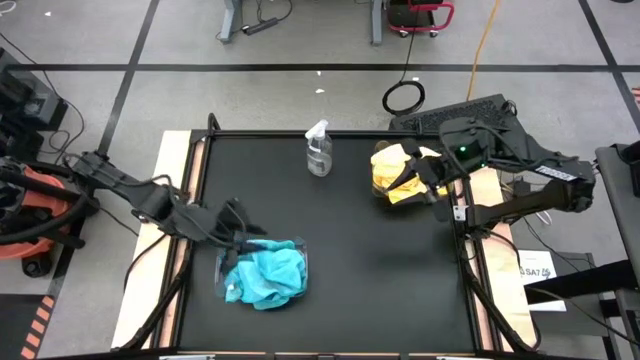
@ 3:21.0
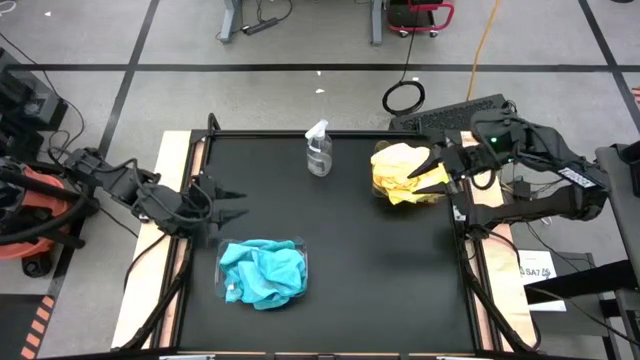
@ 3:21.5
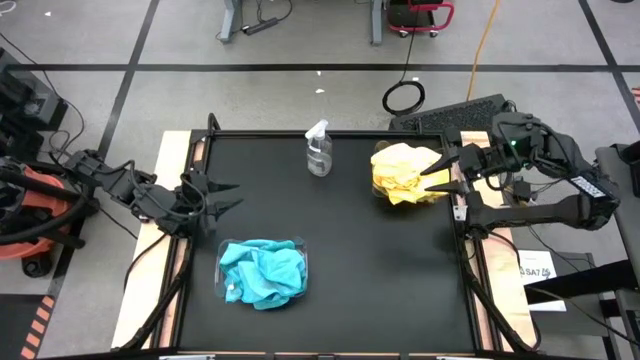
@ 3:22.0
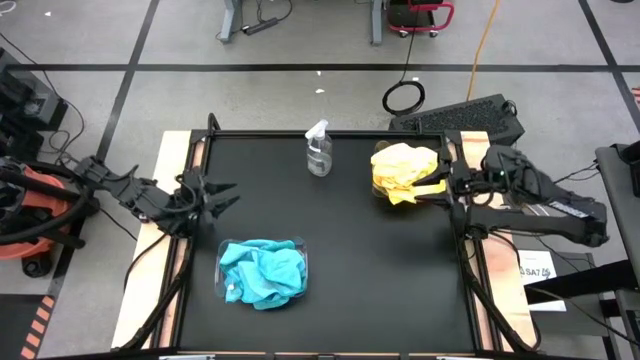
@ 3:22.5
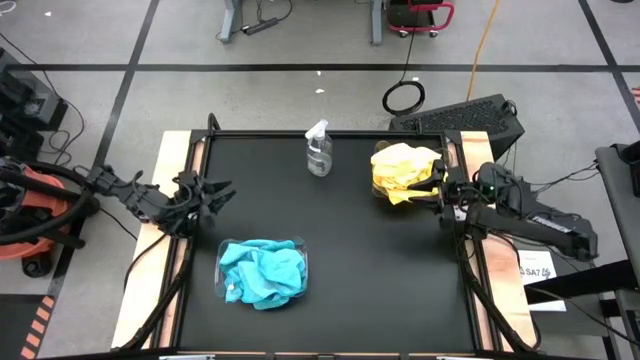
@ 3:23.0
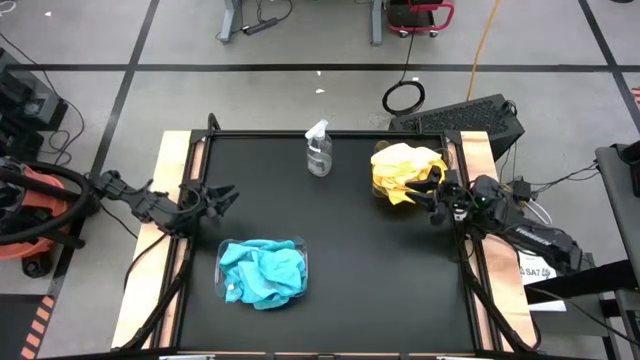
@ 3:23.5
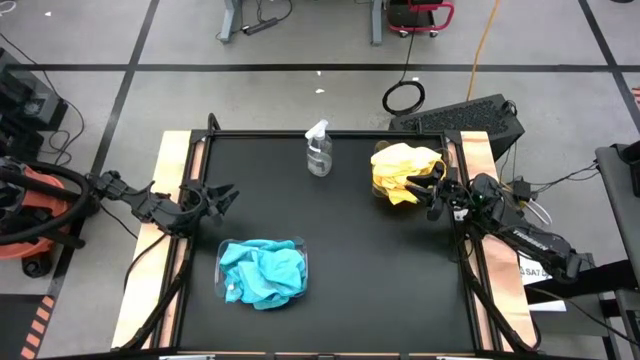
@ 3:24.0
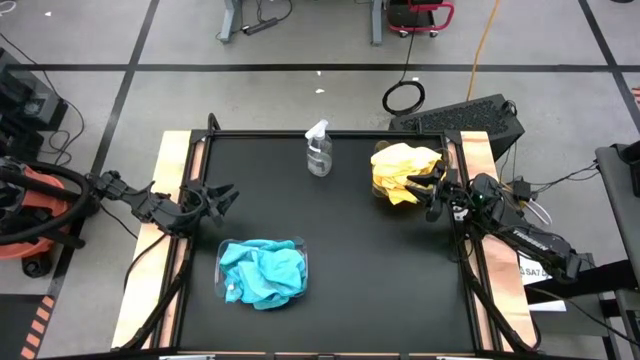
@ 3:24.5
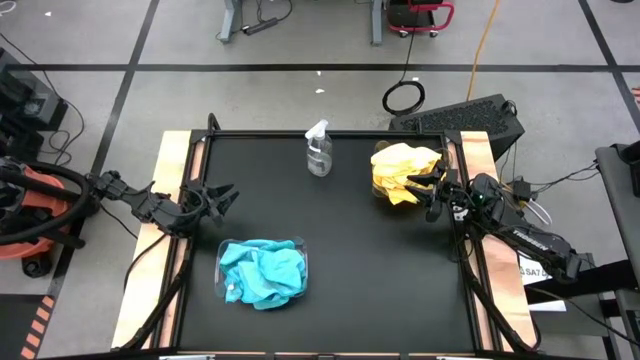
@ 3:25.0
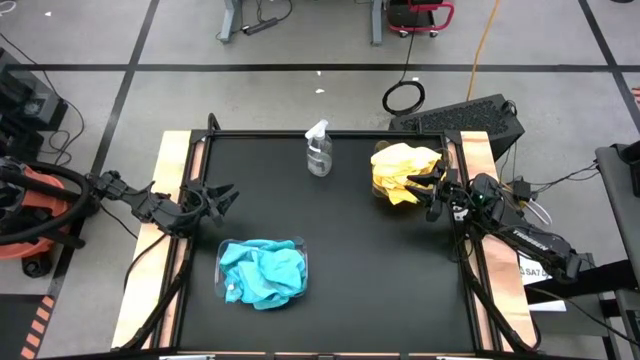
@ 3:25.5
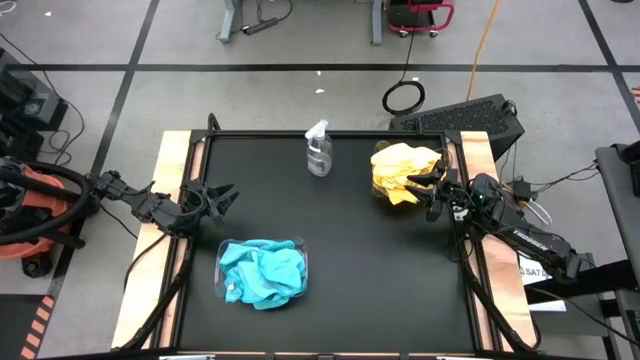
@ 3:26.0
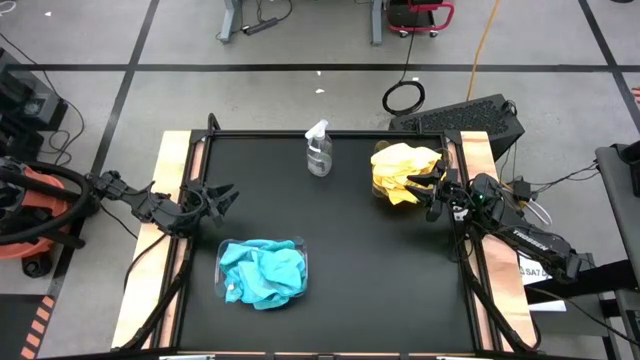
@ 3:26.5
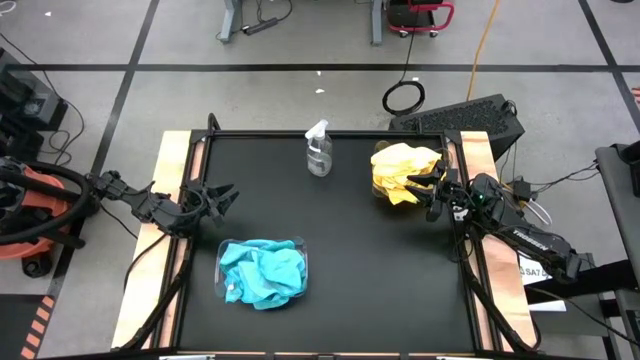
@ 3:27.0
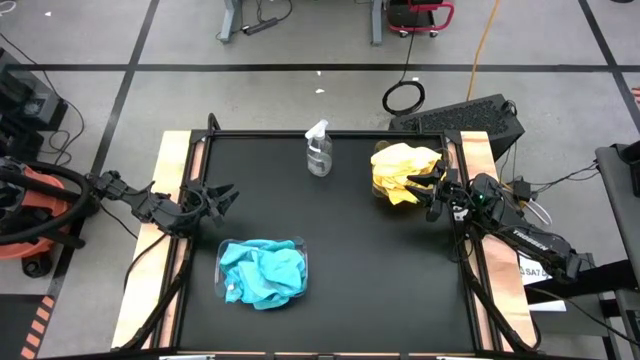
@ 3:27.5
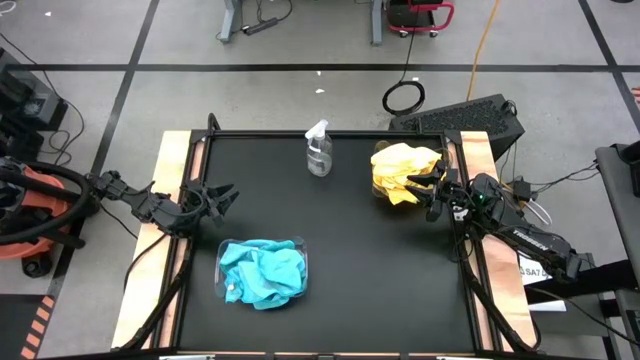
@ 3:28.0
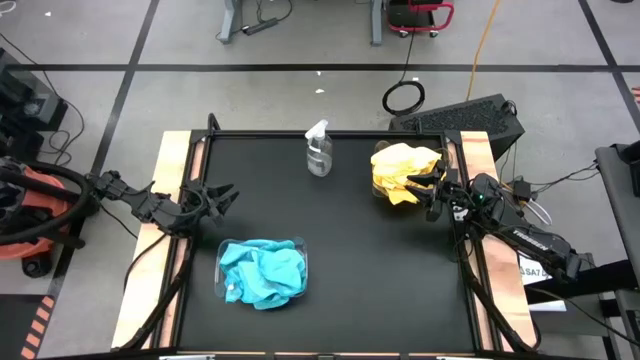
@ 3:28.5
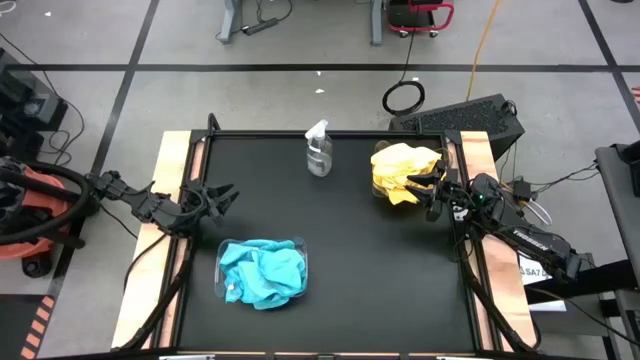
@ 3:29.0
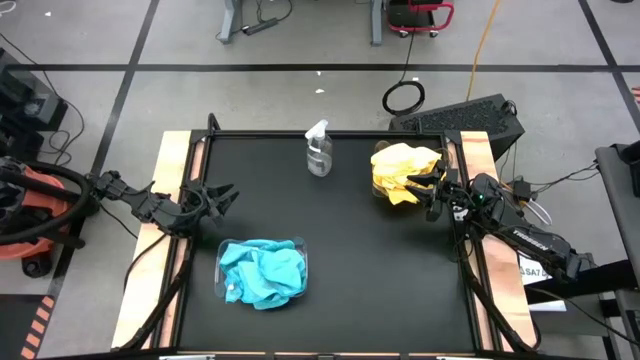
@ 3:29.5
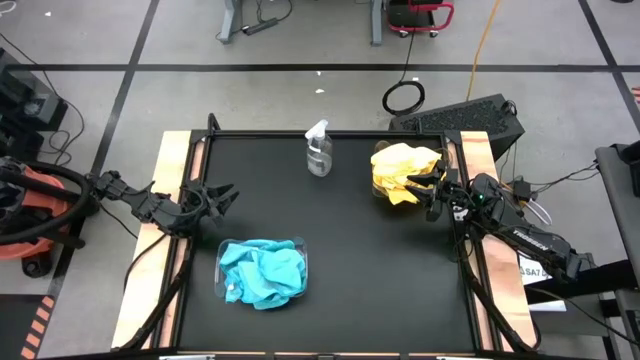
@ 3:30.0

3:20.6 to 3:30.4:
Task: Sort microfiber towel by color & place in baskets
Return to Home Position

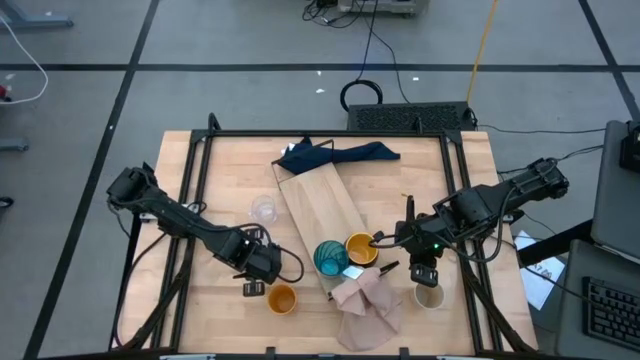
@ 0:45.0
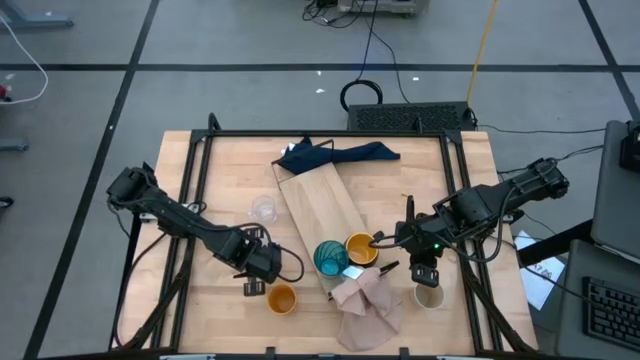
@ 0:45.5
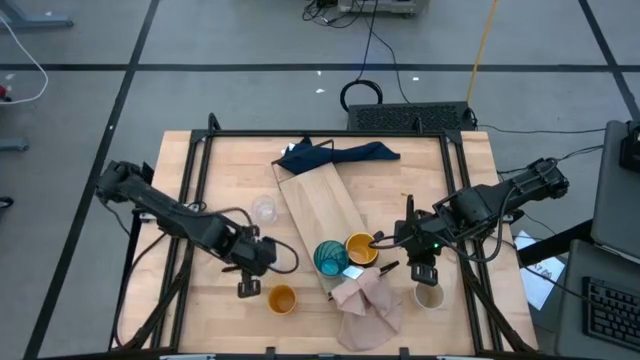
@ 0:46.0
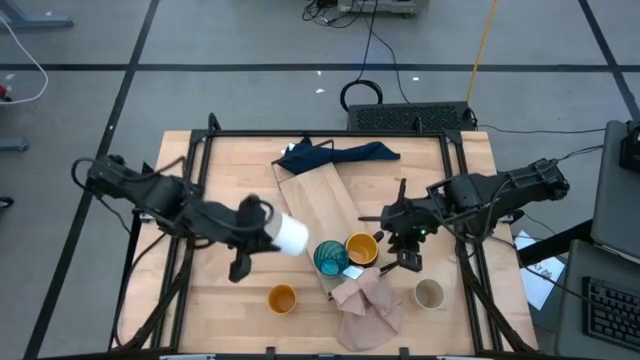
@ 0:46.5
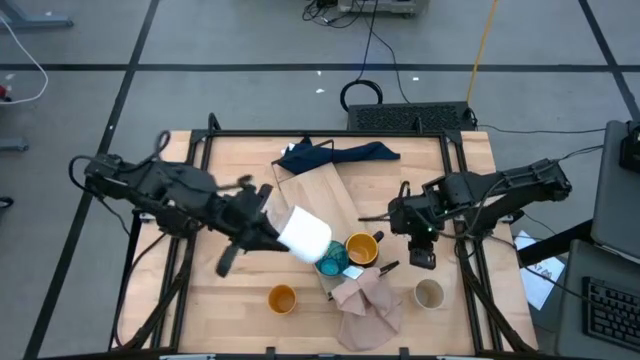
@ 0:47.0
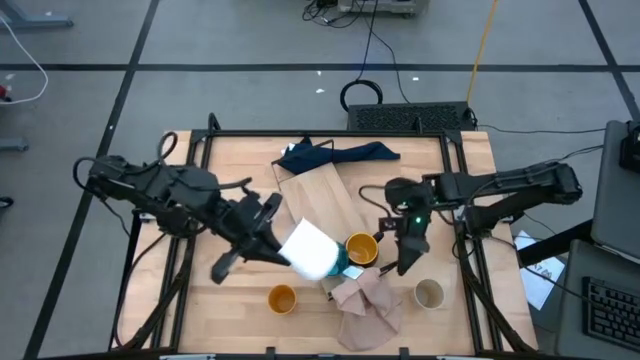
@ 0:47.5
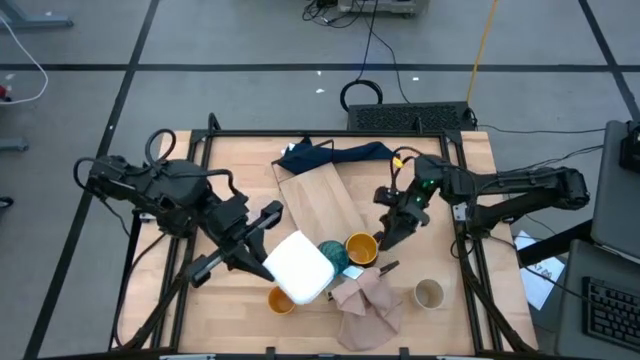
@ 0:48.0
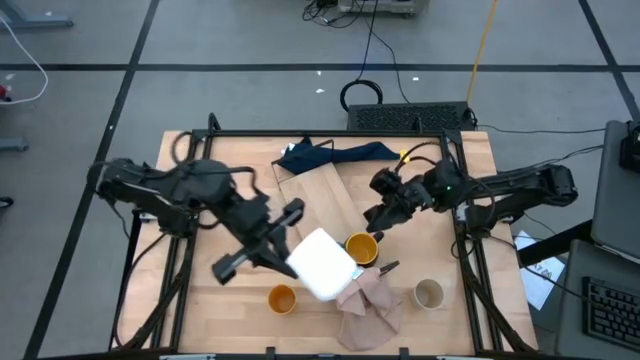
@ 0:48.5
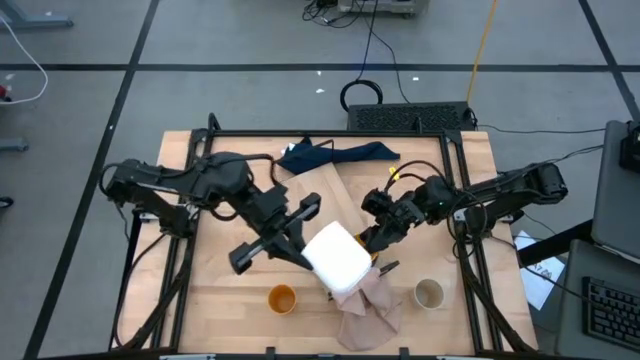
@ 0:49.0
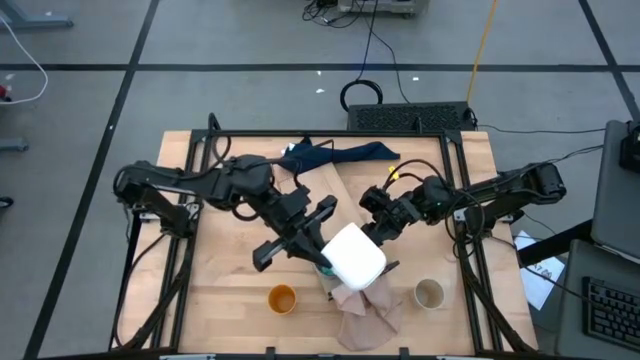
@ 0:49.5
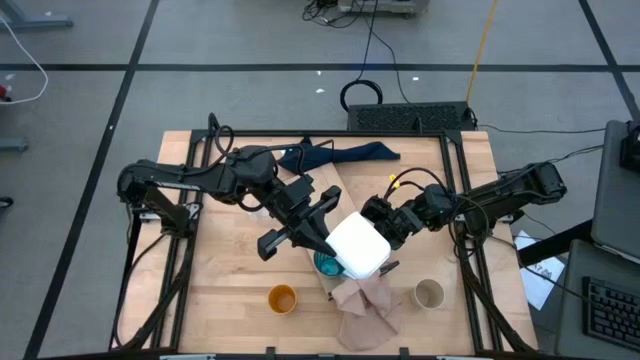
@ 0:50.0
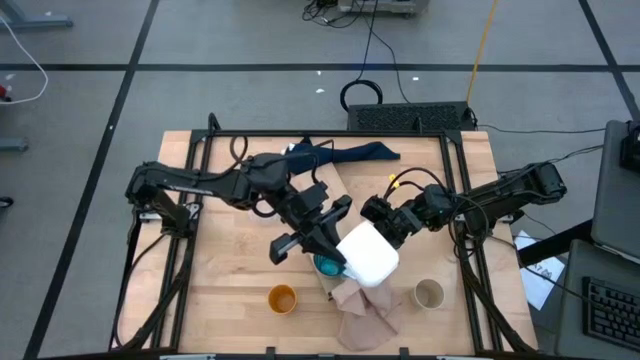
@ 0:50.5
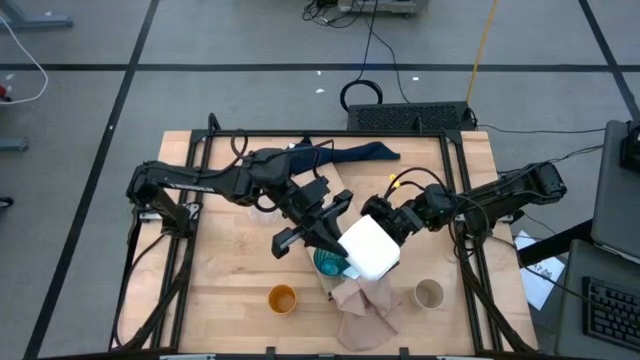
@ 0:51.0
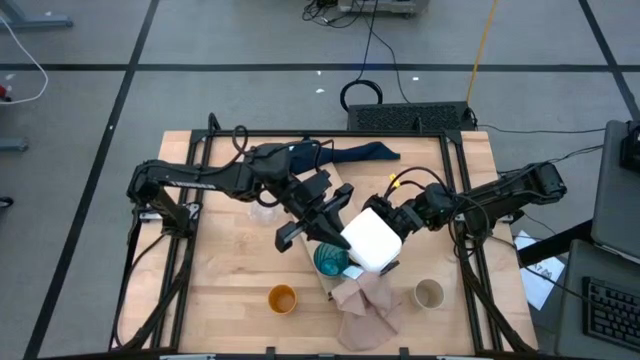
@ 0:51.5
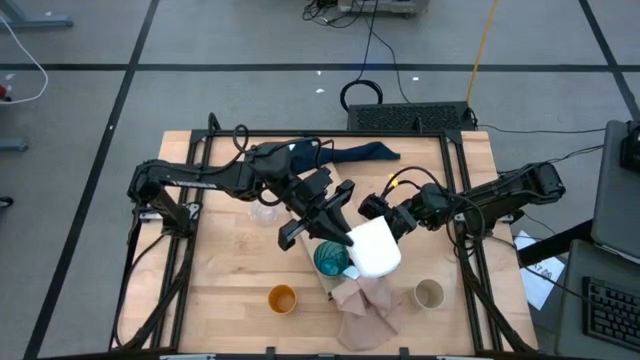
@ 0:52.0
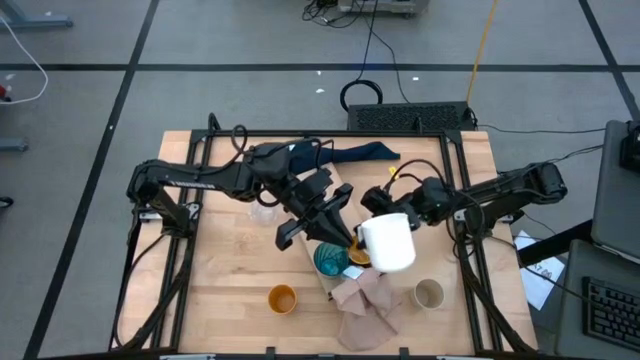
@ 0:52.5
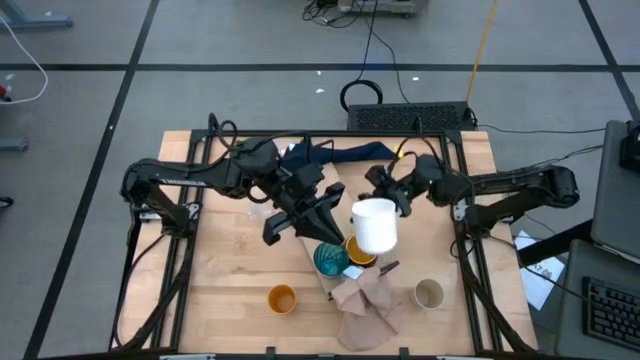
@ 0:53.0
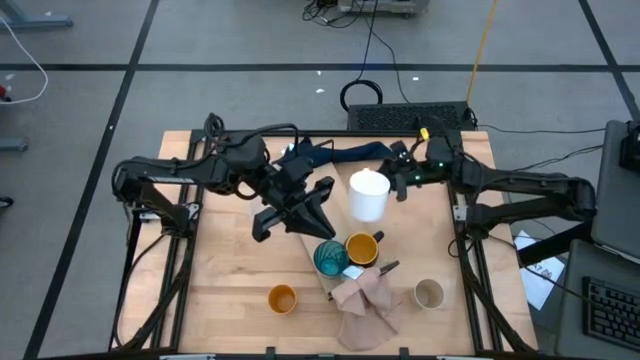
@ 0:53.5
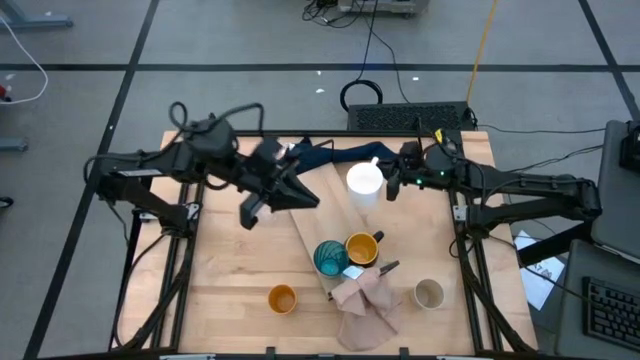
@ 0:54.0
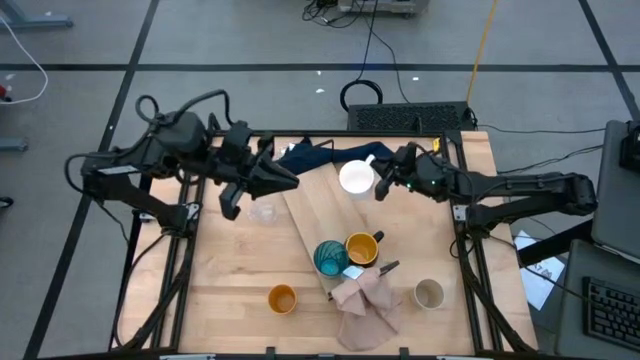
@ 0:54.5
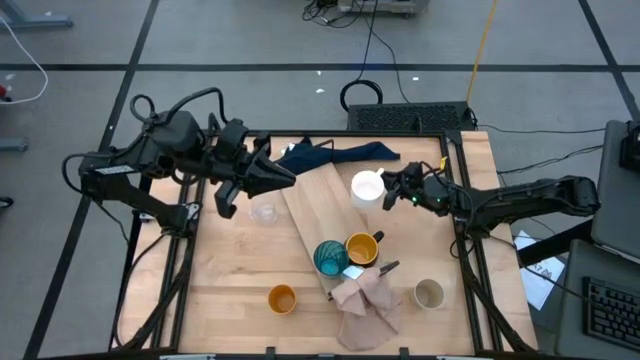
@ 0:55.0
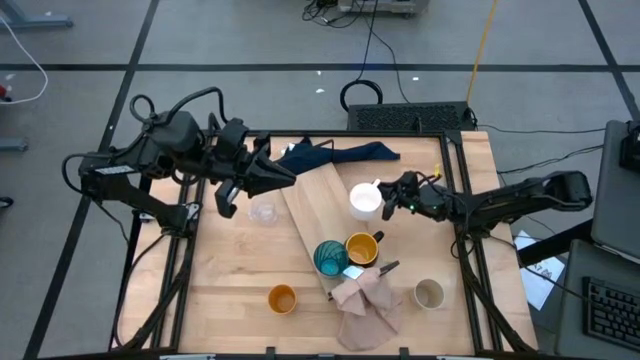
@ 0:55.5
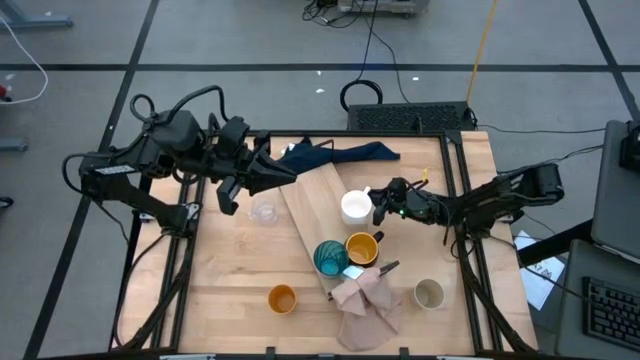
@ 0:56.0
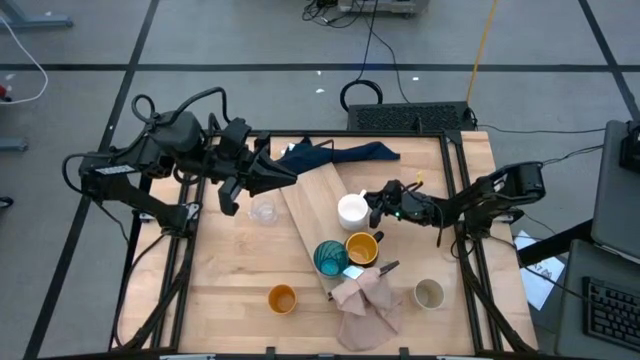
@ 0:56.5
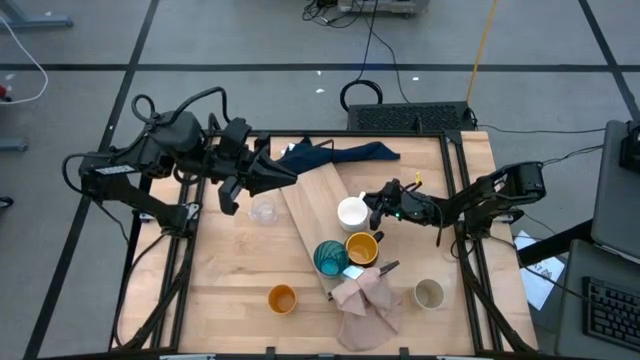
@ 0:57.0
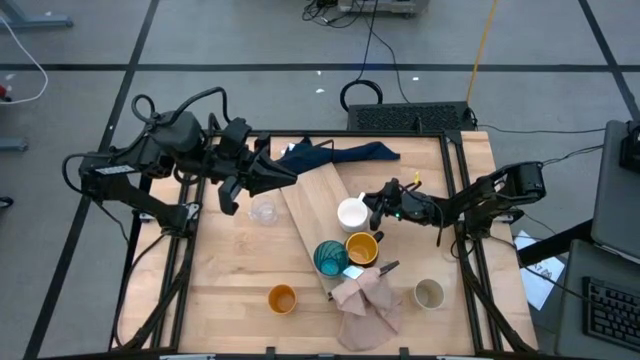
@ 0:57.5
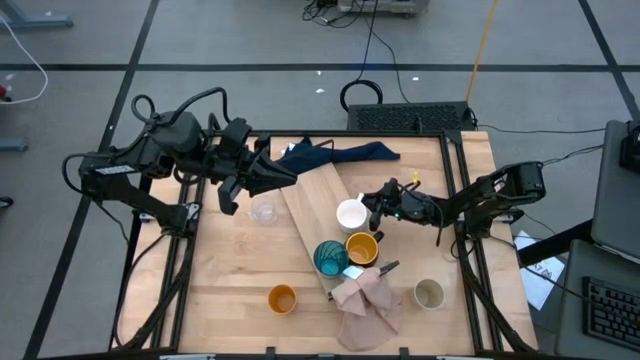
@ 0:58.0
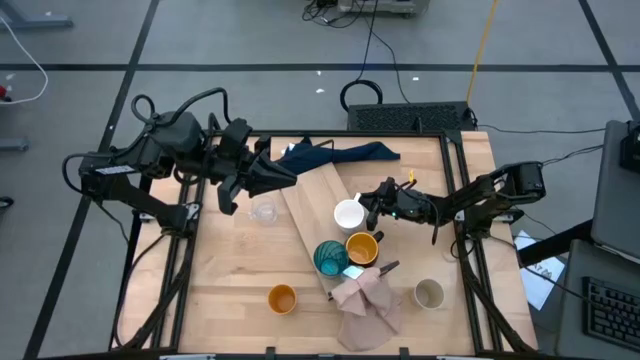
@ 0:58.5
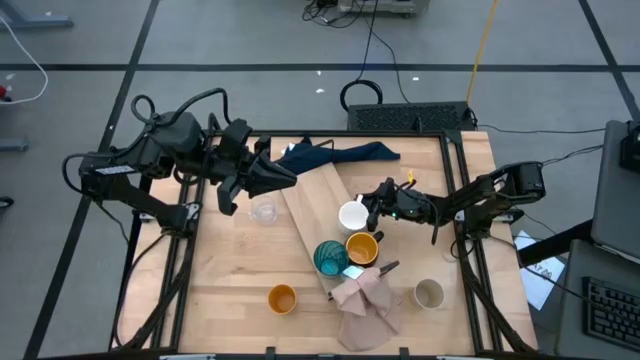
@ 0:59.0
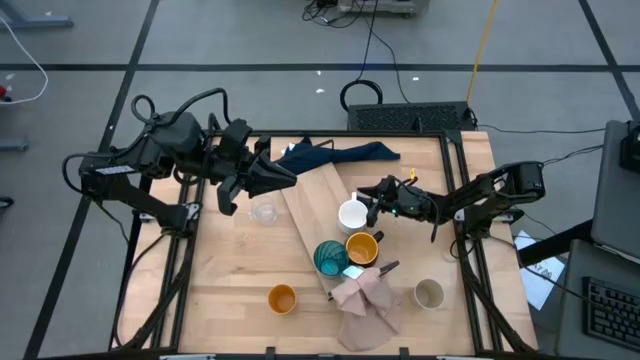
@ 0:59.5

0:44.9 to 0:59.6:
Task: Stack small to large cups/mugs on shelf
Put the black mug on the shelf
